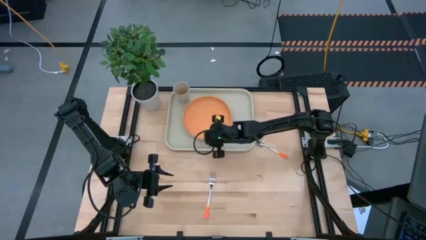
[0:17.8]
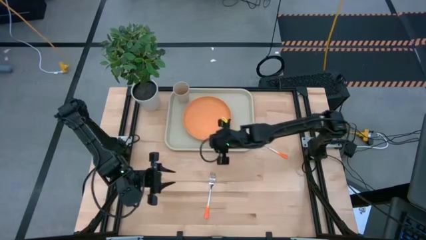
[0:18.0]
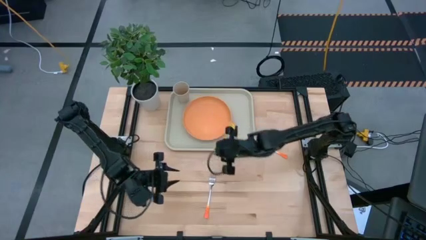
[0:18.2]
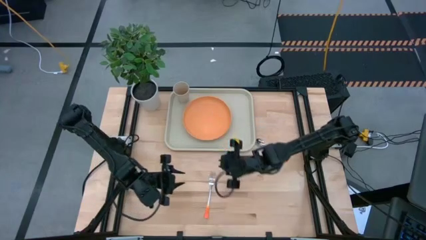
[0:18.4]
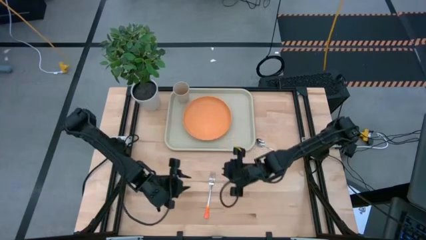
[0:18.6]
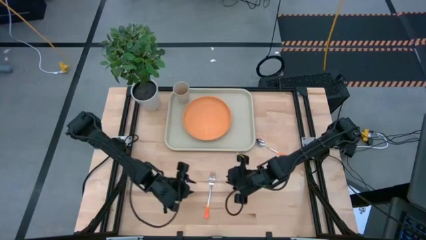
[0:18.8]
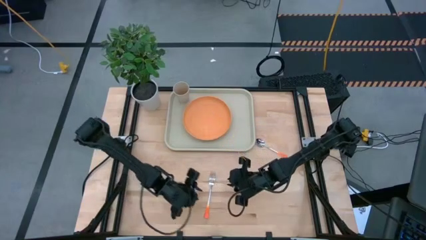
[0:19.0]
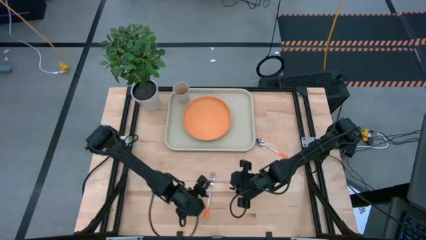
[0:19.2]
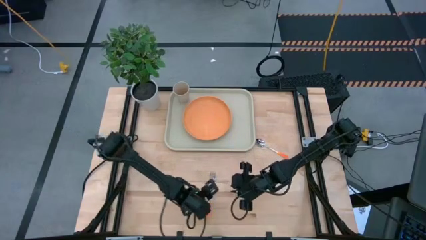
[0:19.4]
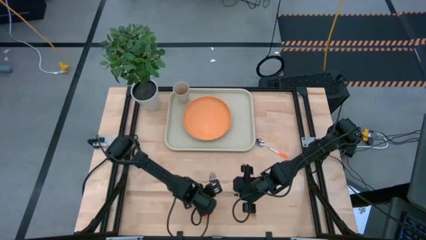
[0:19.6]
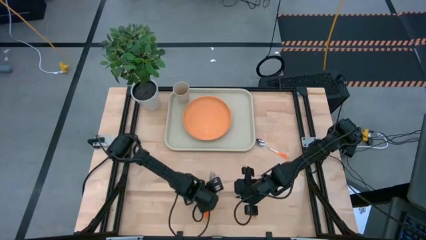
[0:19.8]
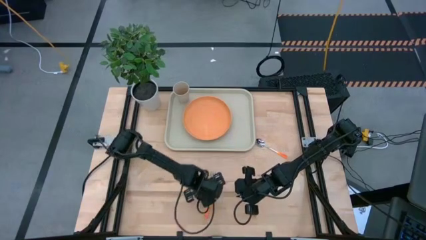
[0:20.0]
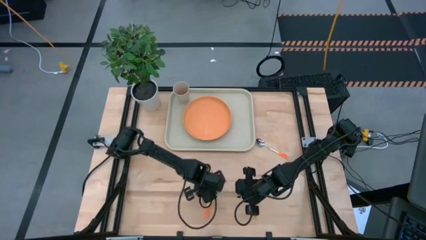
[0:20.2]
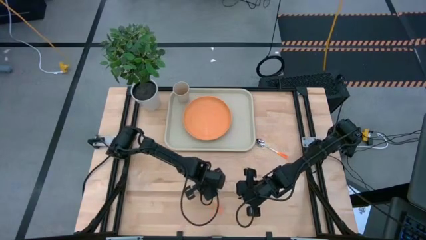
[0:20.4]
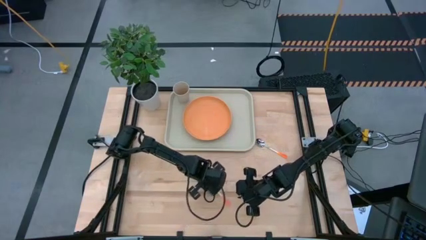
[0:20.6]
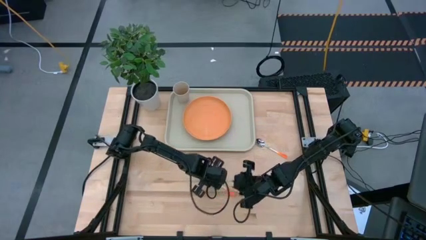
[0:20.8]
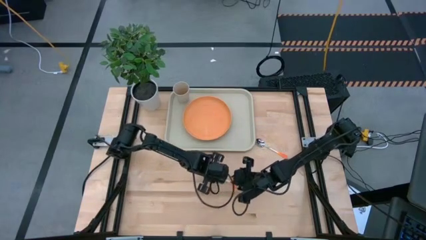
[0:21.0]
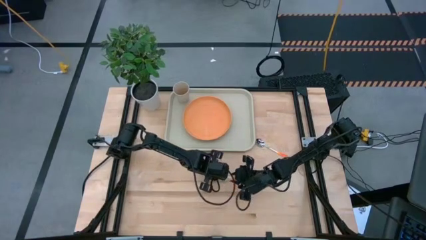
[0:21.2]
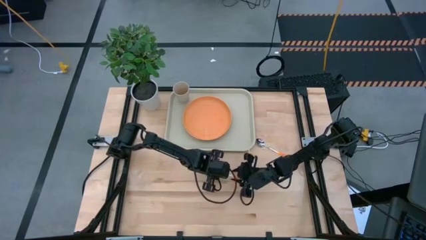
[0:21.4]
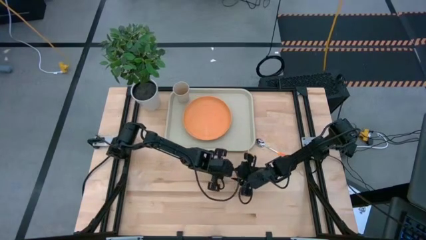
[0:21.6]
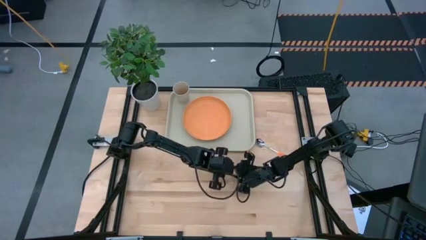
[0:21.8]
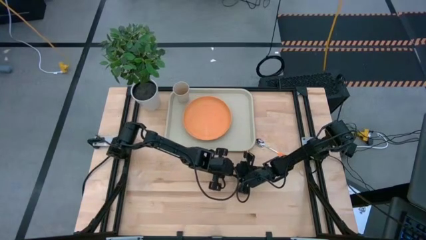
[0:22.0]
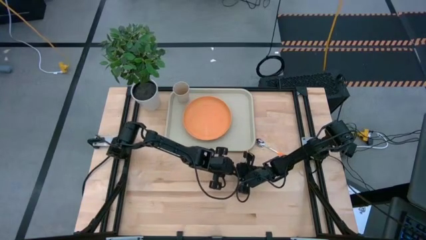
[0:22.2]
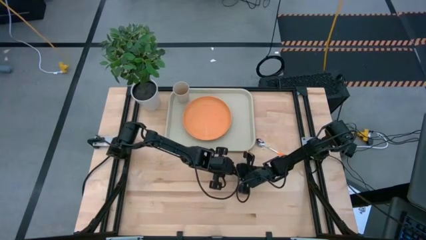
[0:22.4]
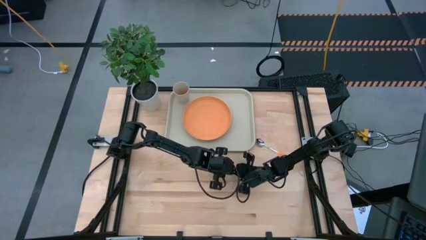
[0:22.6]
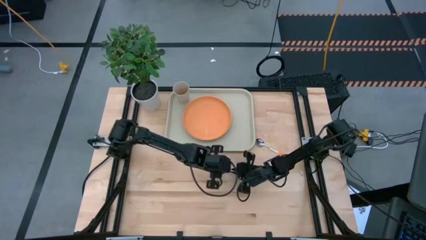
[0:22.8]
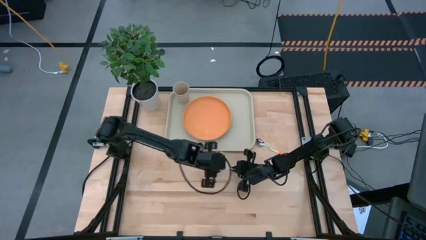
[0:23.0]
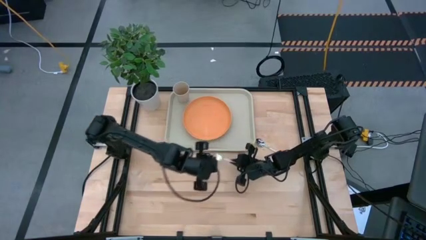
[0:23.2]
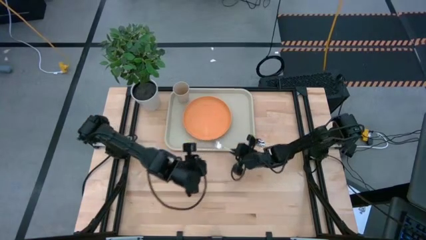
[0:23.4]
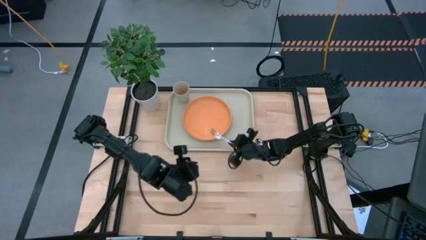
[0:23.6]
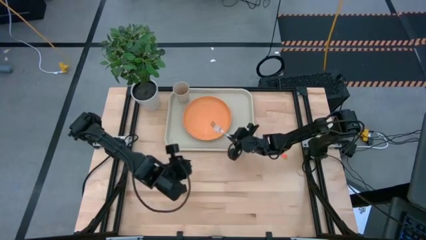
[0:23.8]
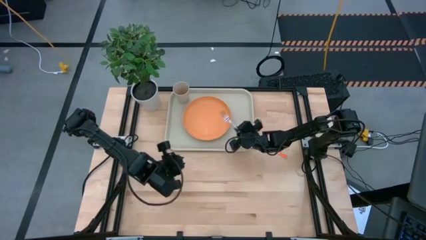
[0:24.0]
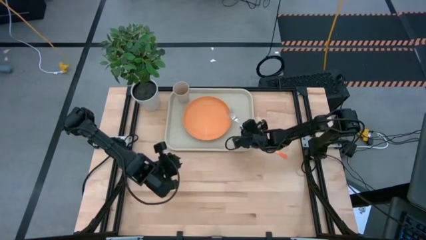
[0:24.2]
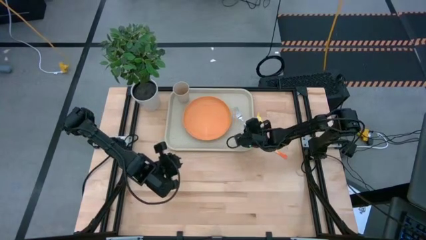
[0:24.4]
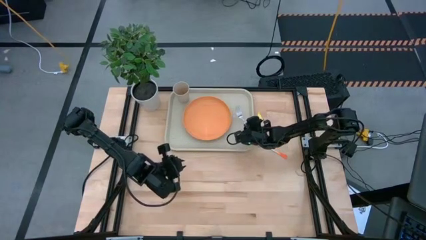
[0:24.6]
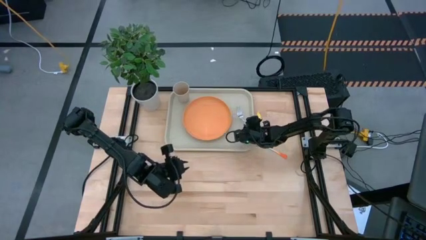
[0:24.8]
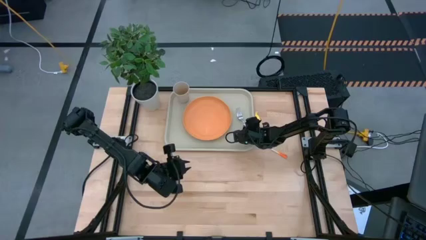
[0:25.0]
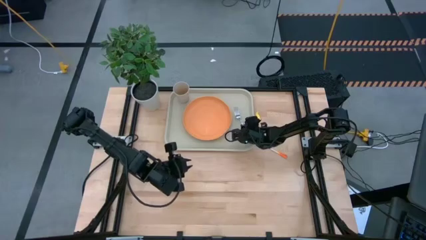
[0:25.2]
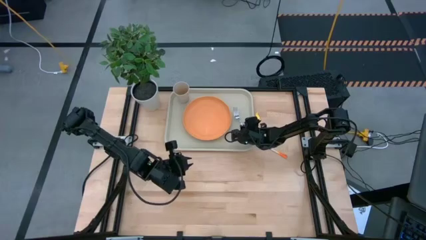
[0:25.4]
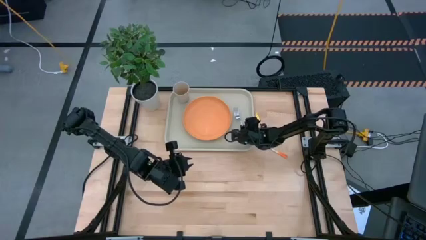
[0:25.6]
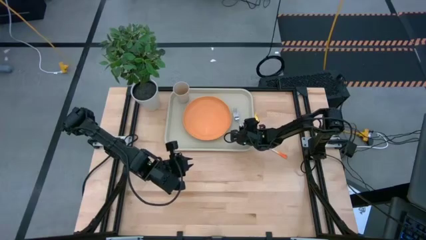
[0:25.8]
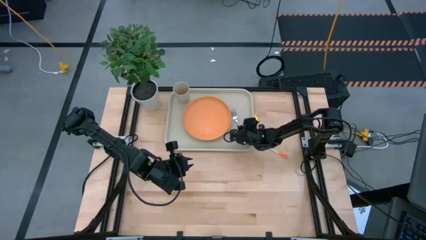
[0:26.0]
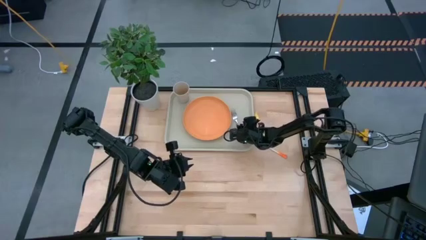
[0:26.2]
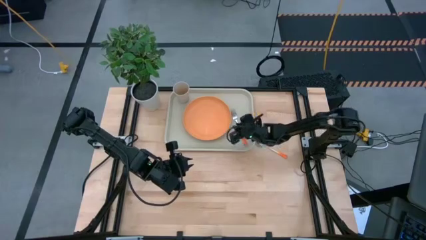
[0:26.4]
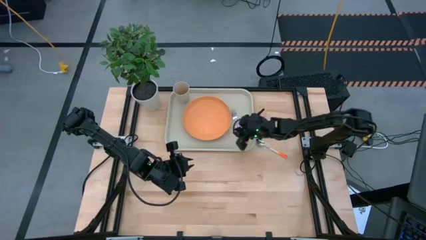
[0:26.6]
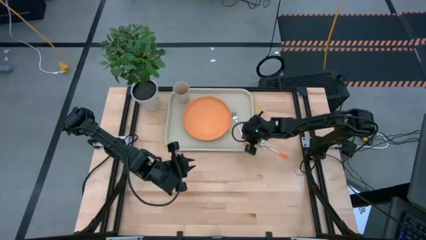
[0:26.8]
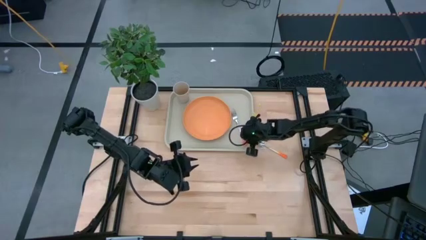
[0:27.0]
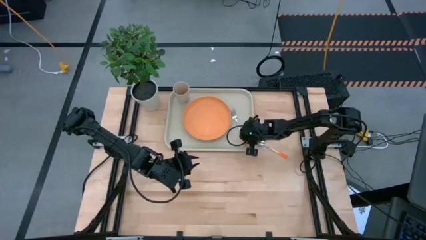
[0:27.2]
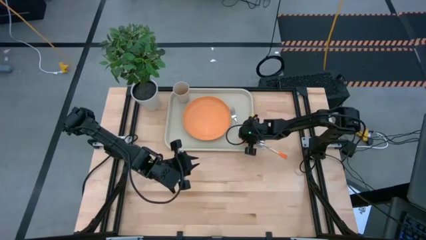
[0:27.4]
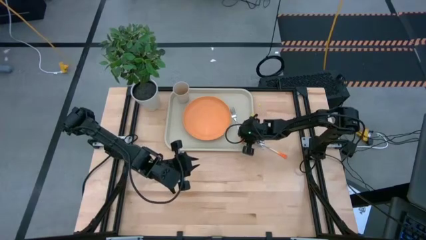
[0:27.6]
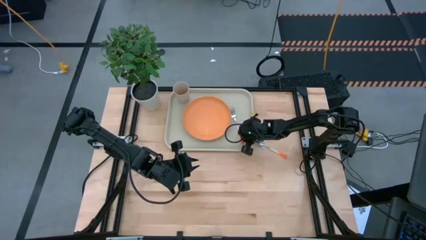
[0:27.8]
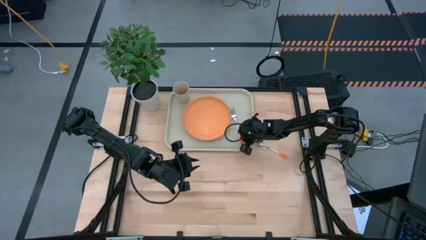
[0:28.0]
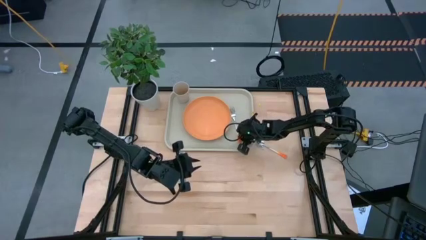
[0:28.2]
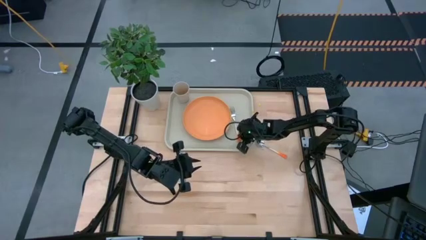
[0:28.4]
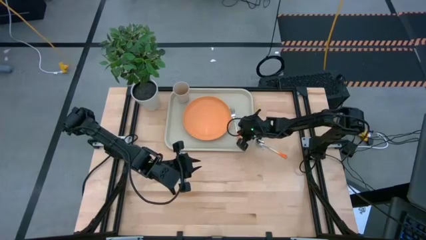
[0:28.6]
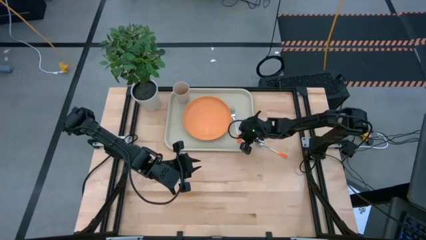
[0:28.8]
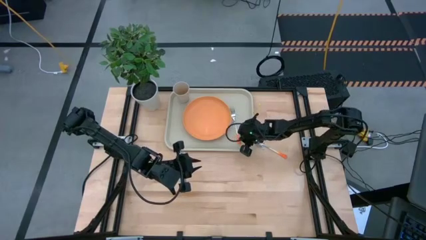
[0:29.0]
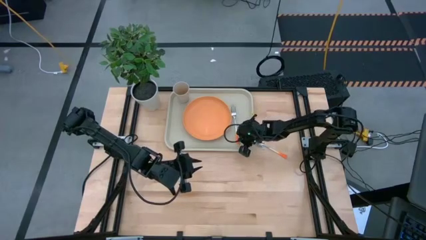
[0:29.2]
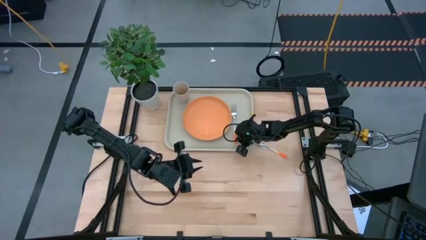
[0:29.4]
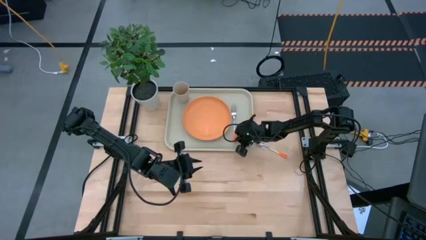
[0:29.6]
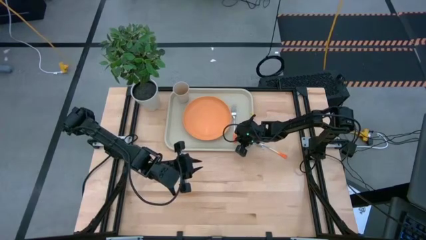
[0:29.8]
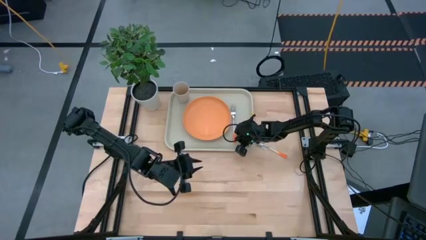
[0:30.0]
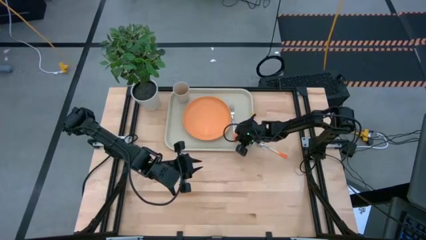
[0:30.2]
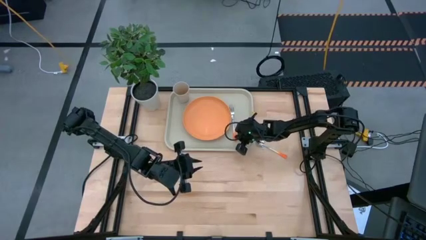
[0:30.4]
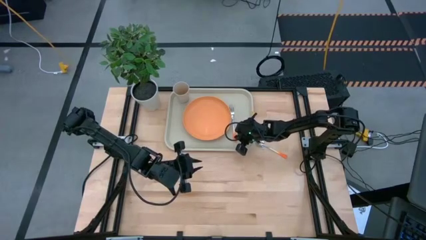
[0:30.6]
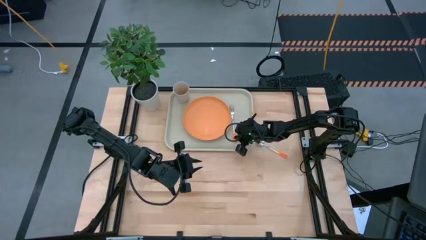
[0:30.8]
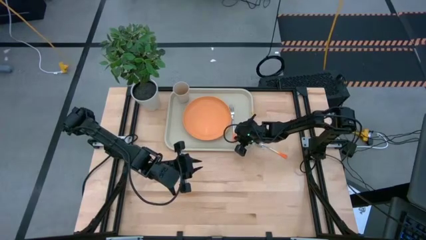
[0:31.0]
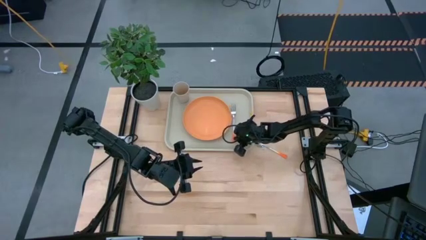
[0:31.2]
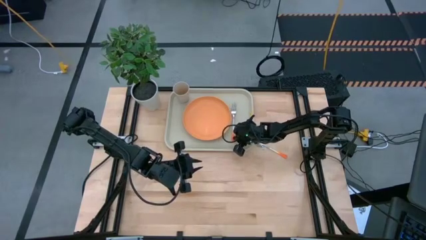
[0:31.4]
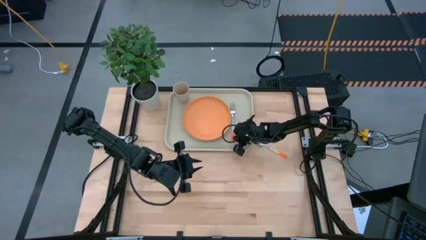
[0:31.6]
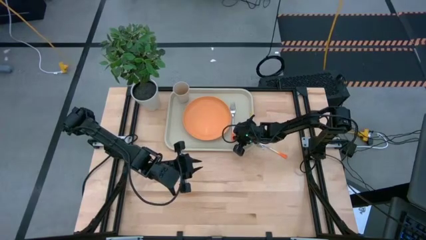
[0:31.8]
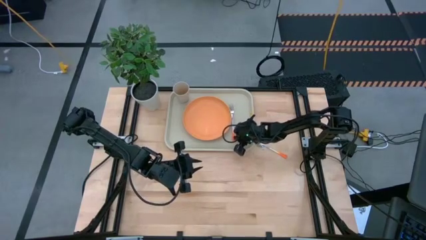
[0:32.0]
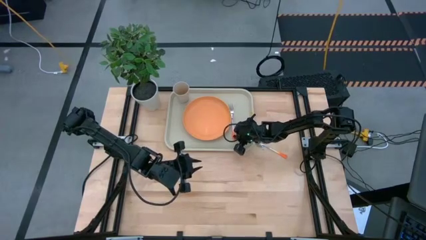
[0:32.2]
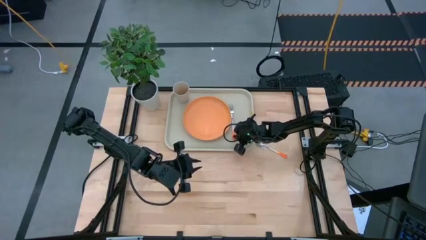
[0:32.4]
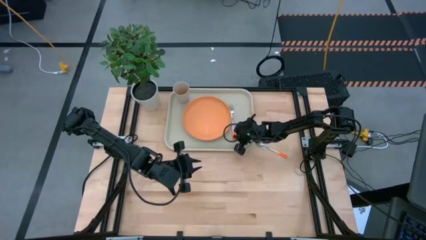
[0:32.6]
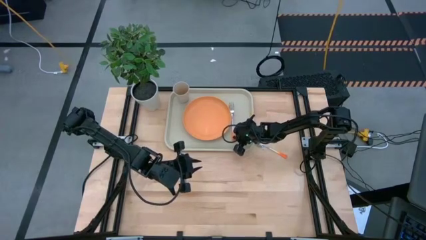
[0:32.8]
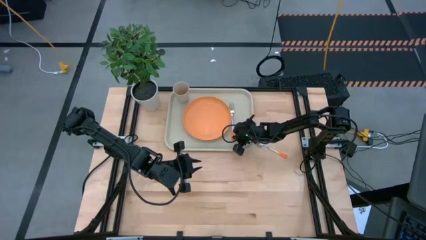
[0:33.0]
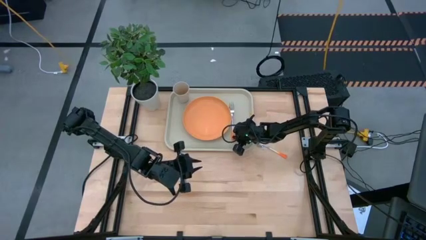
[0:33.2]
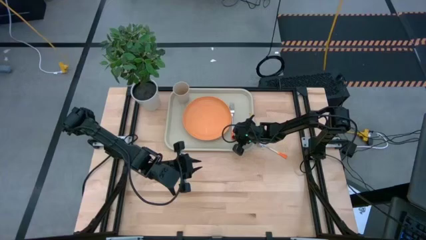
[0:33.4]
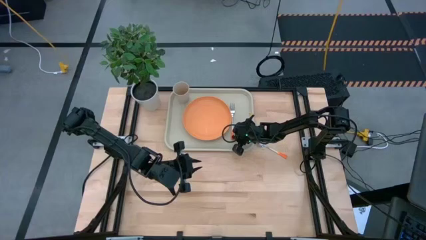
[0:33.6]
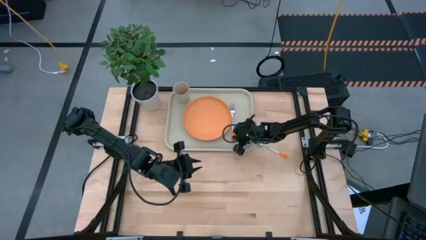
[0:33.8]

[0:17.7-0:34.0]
Task: Pick and place plate/cup/fork/spoon on tray
Put the orange fork on the right side of the brown tray
